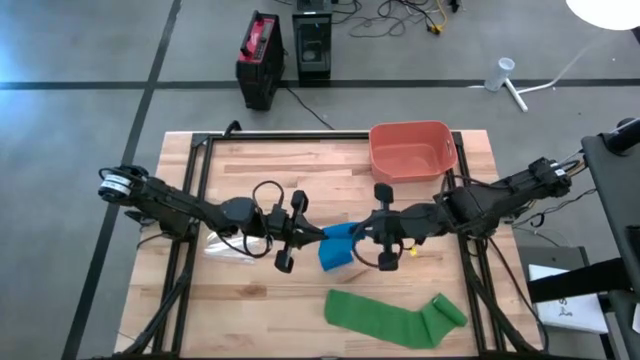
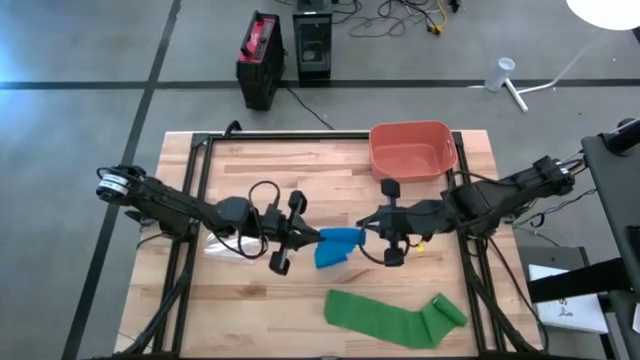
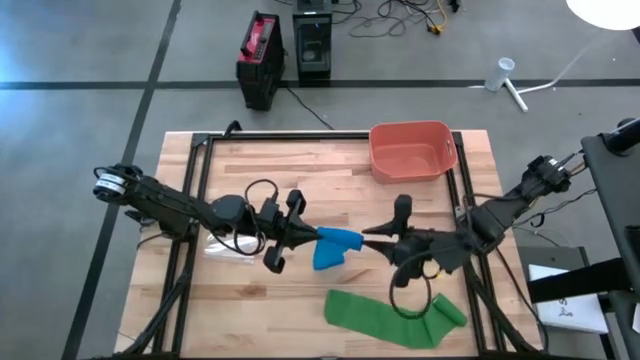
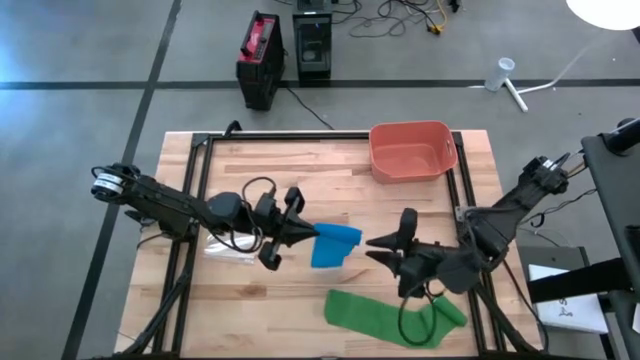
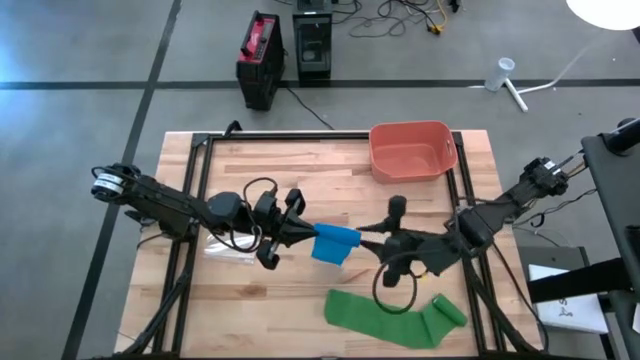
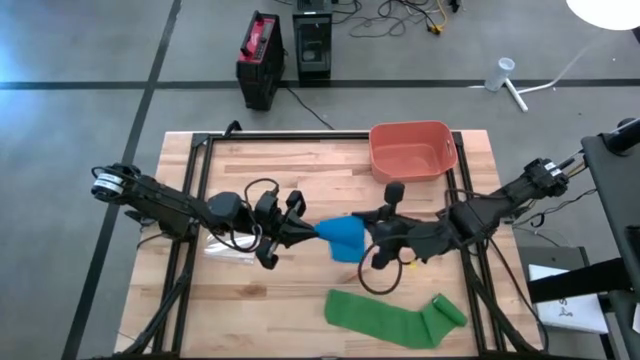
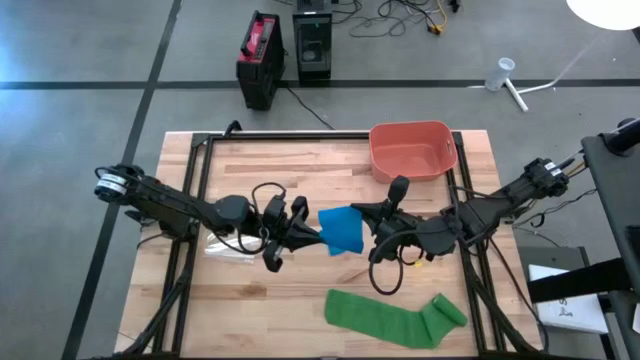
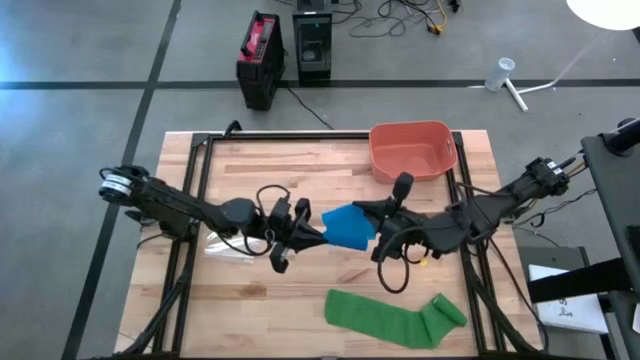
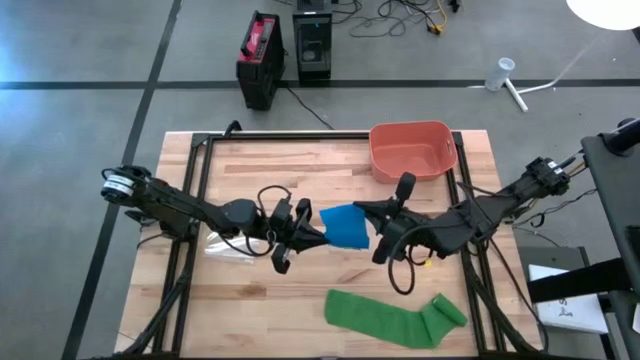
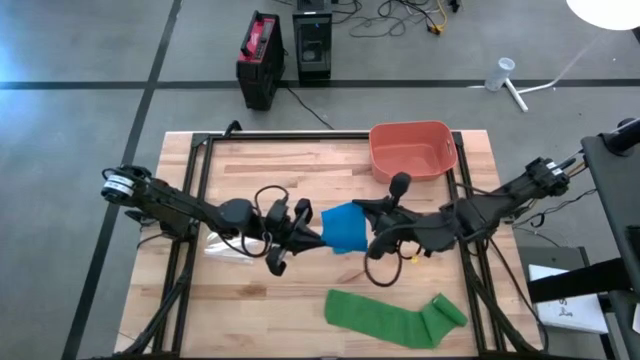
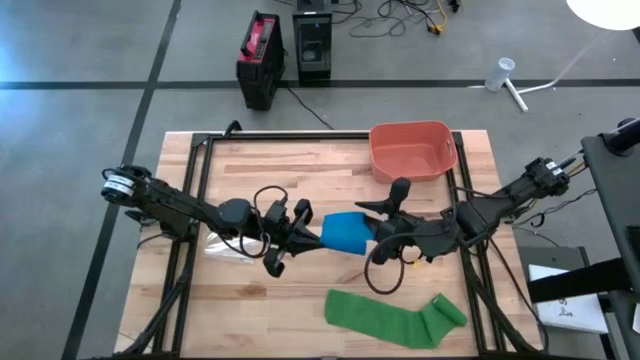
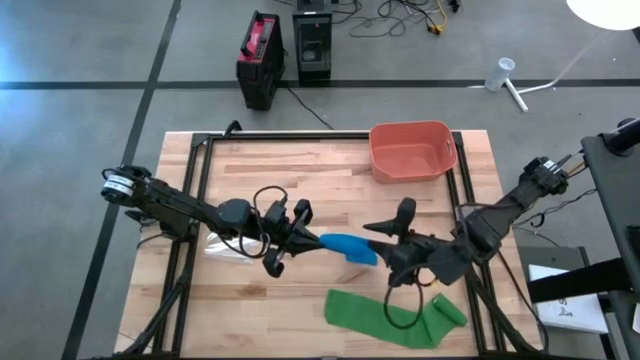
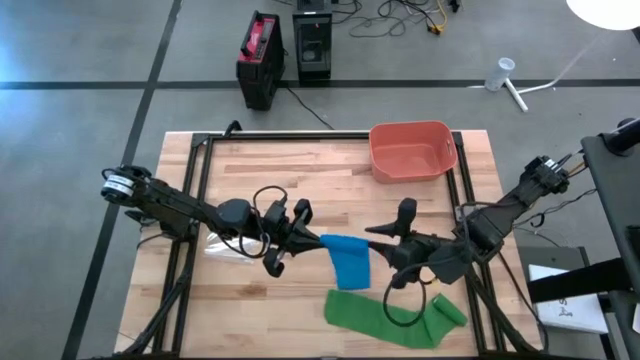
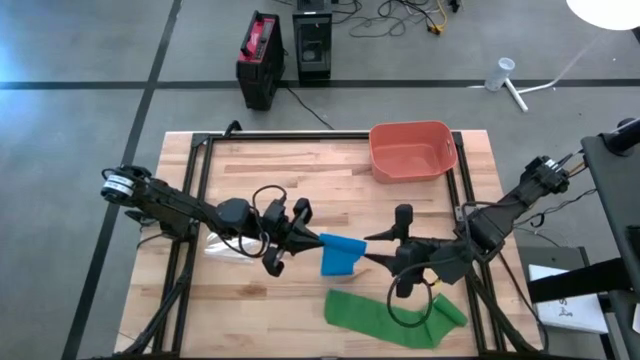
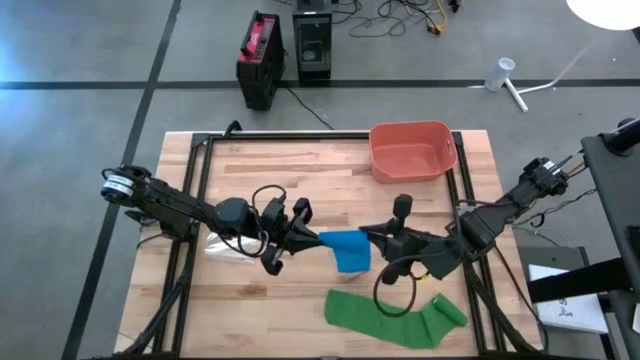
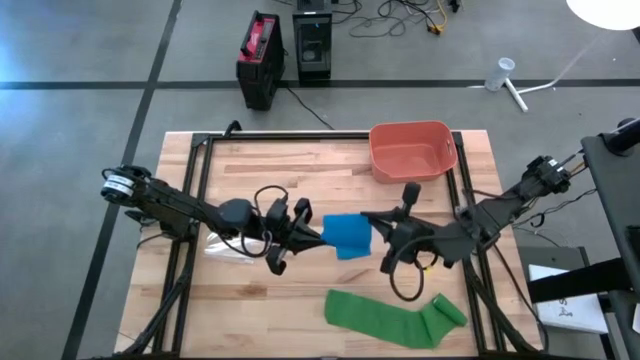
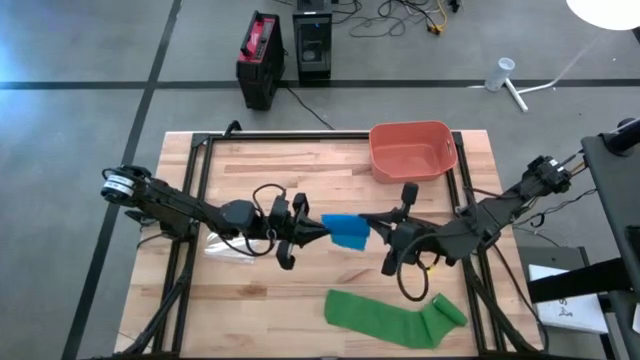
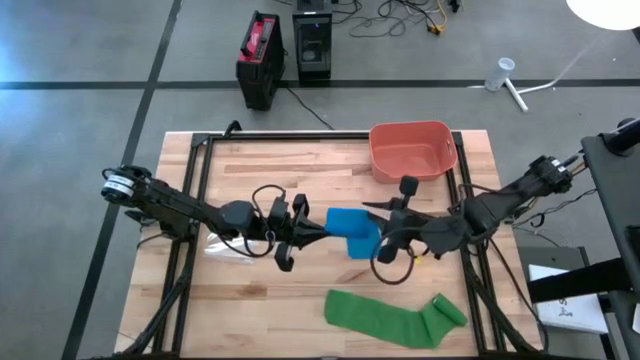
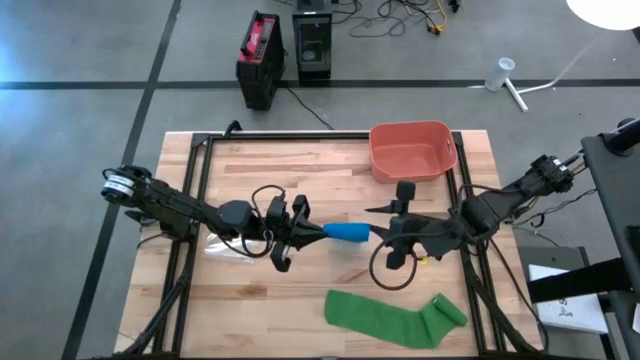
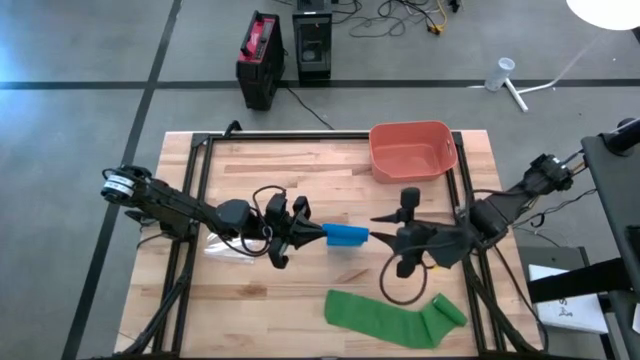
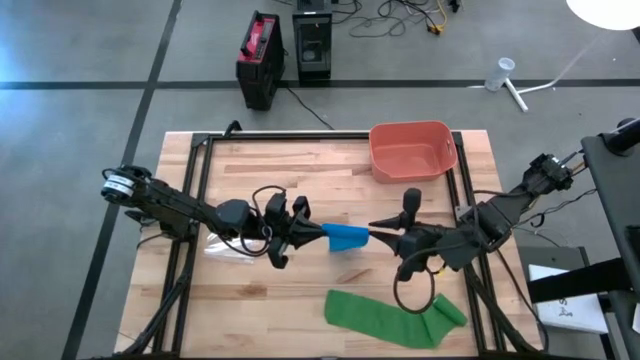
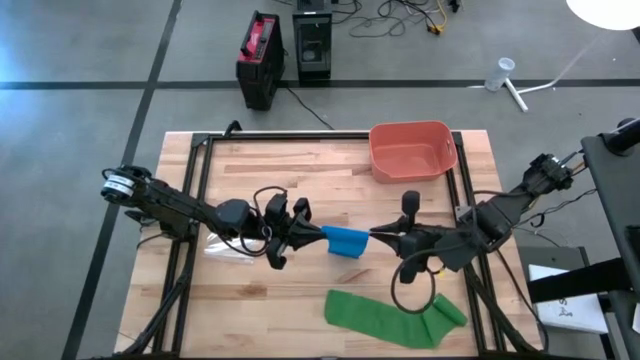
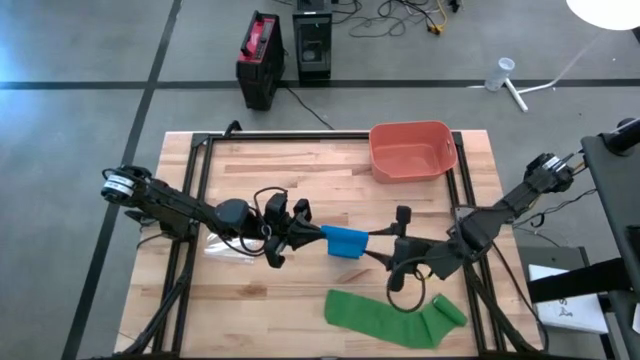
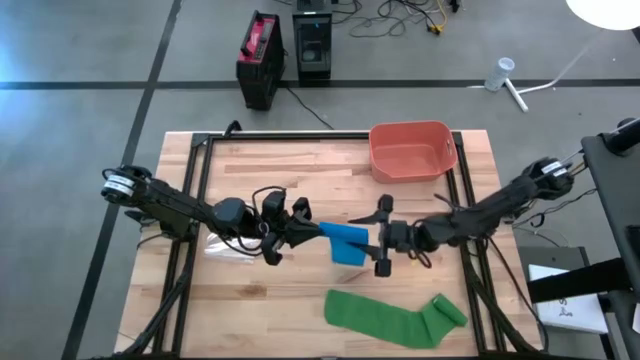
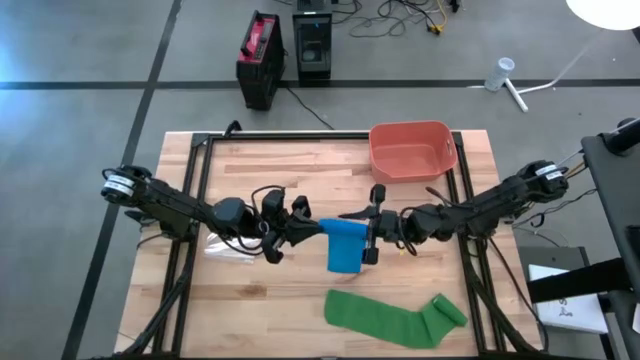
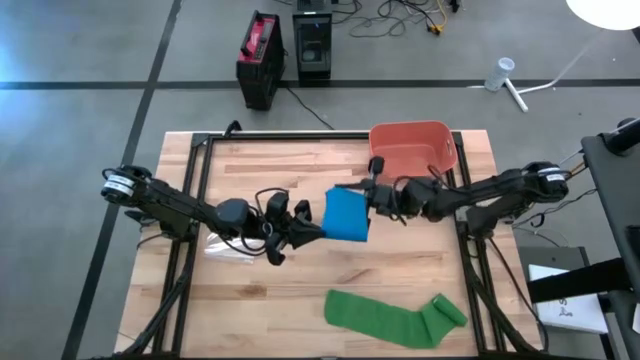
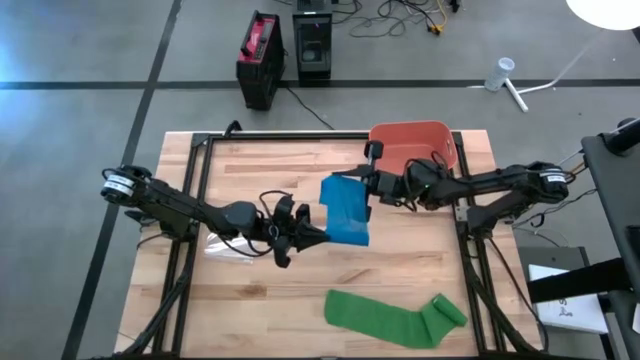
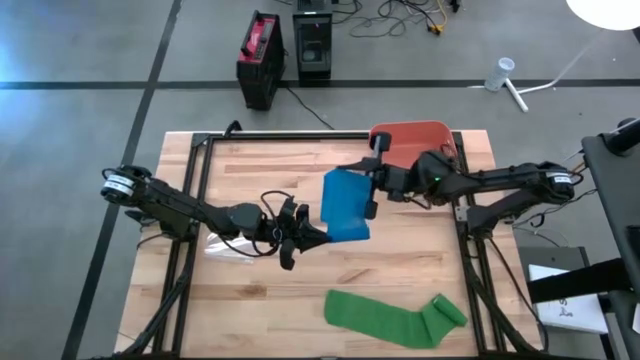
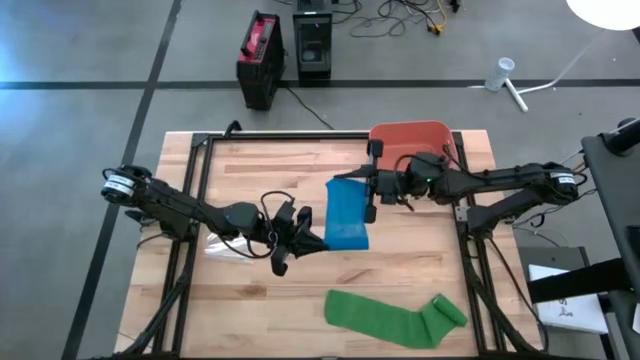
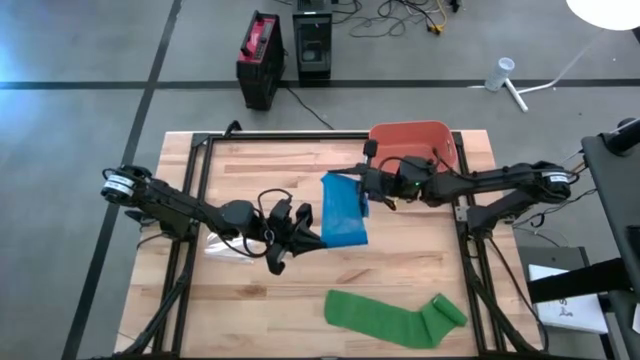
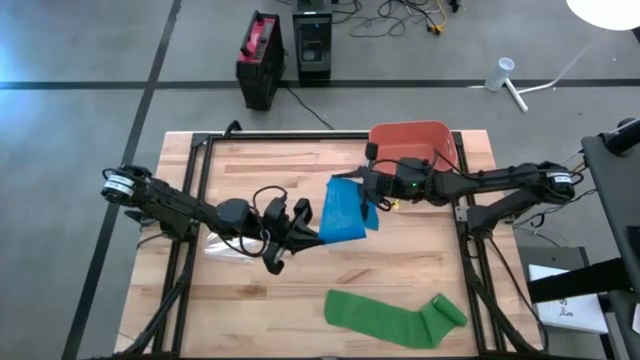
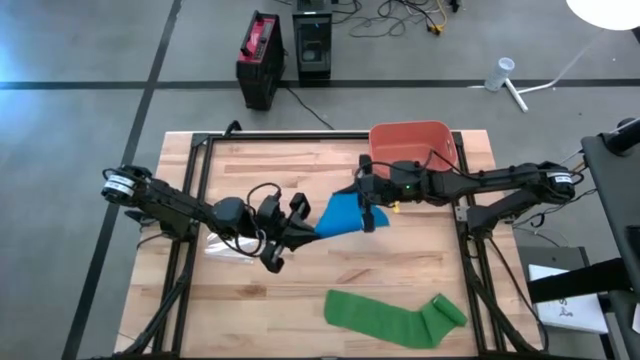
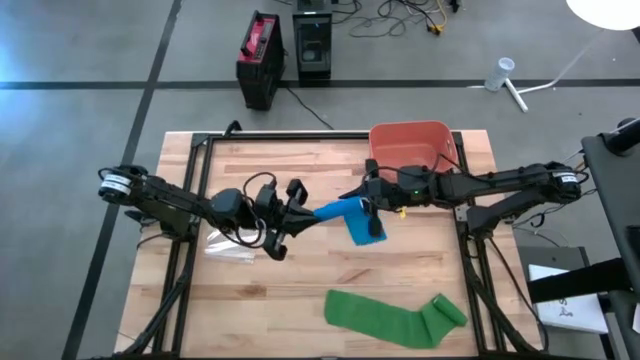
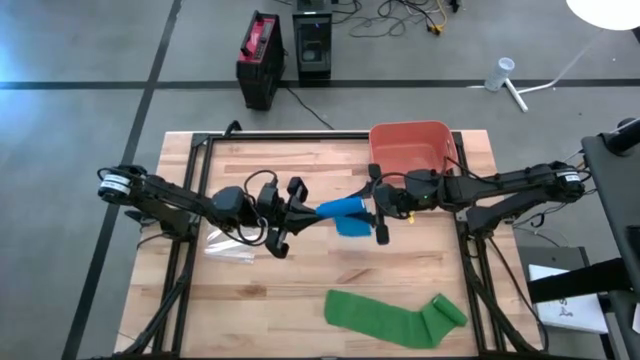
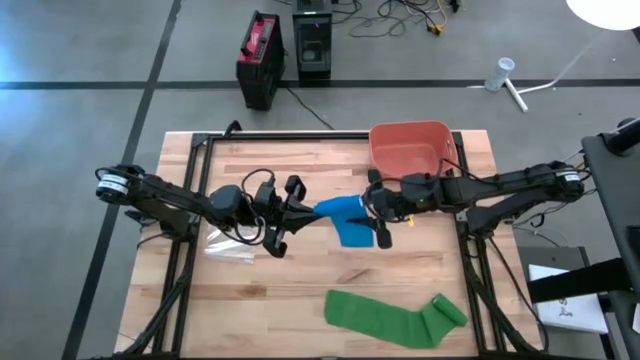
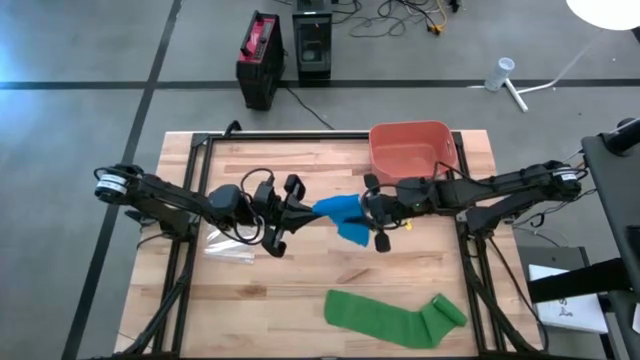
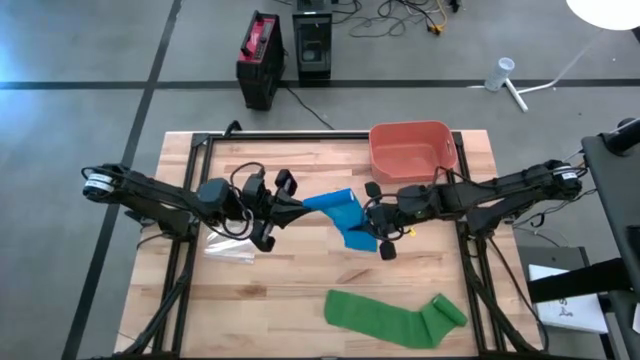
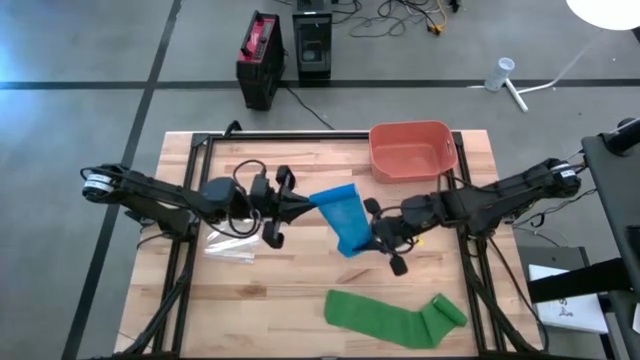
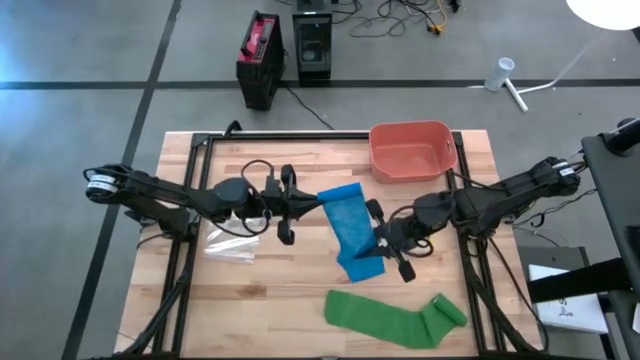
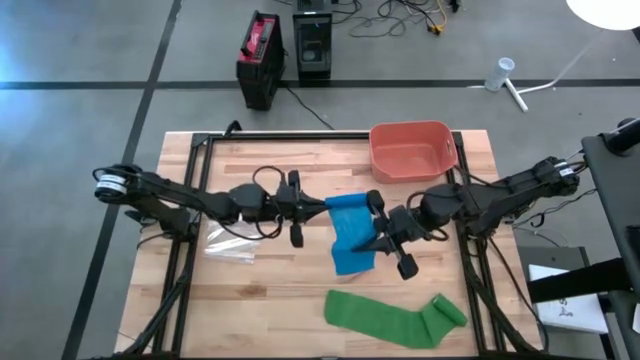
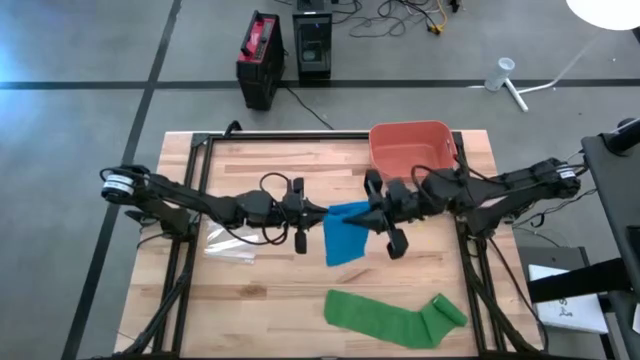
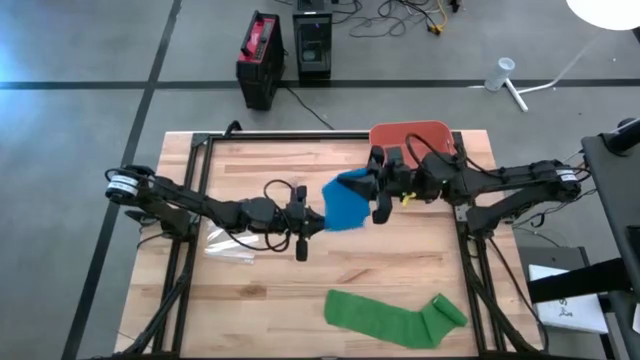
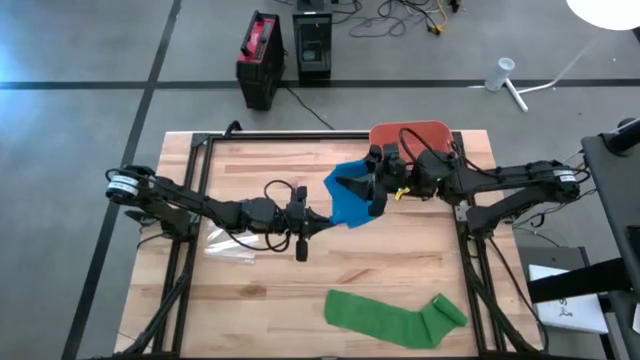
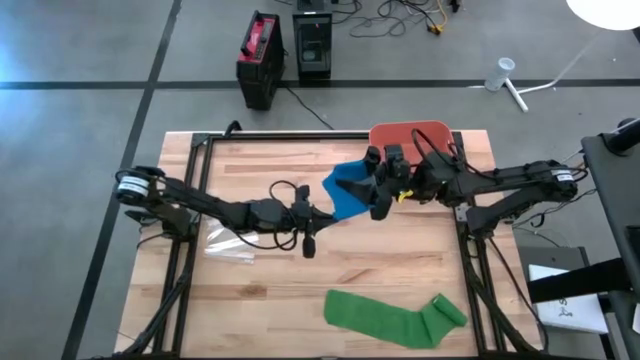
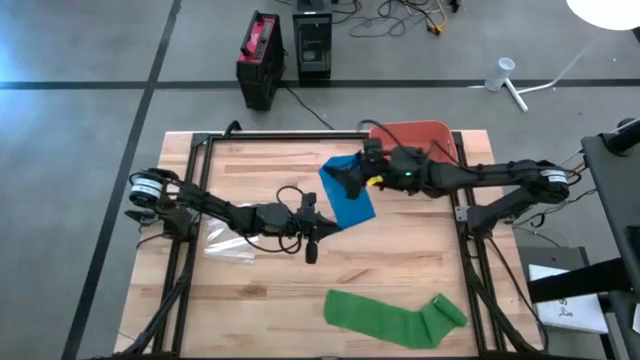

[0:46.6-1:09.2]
Task: Roll bandage
Roll the blue bandage
